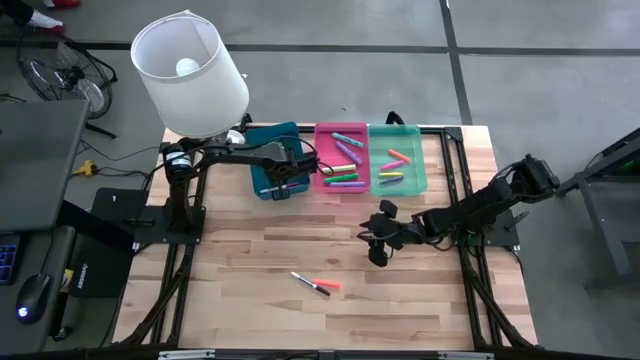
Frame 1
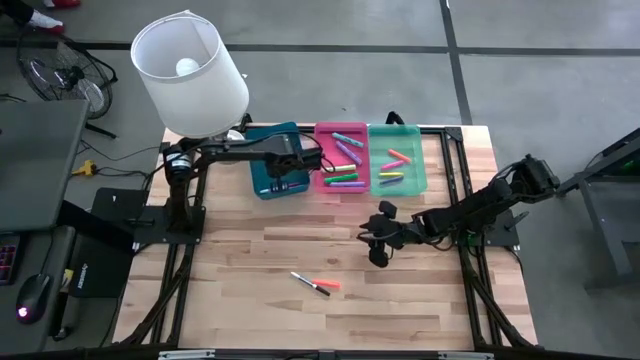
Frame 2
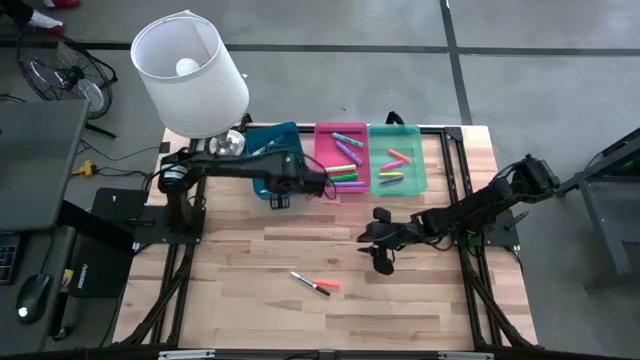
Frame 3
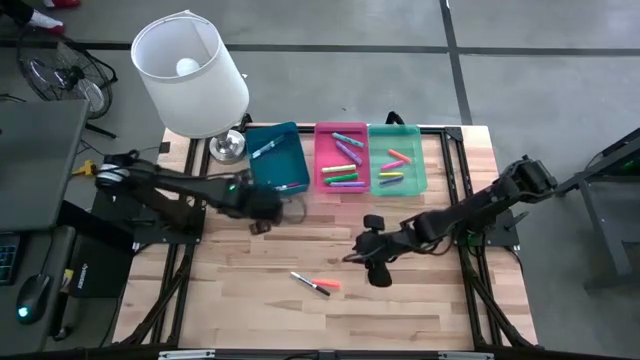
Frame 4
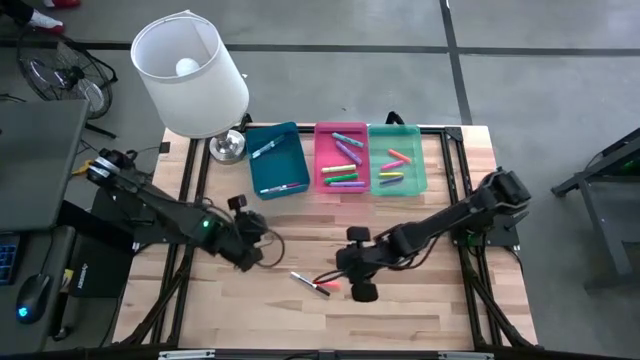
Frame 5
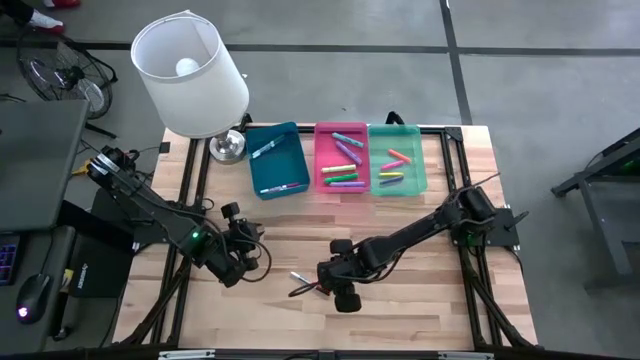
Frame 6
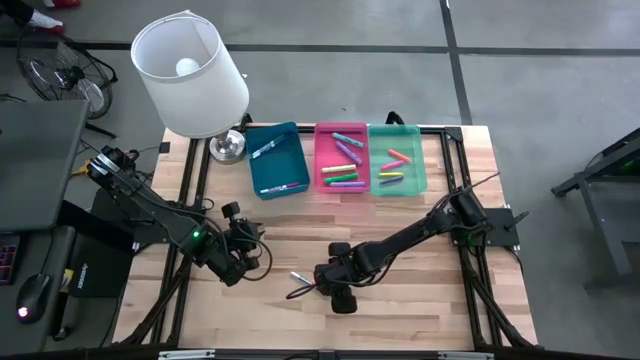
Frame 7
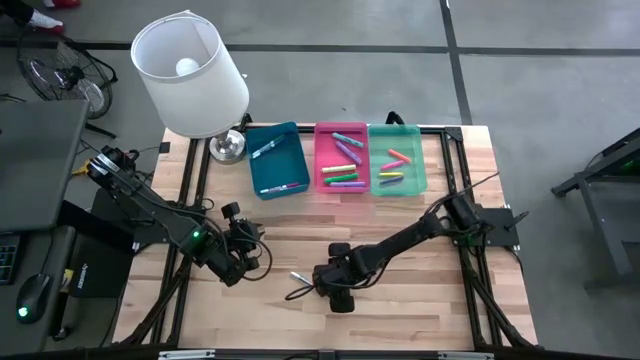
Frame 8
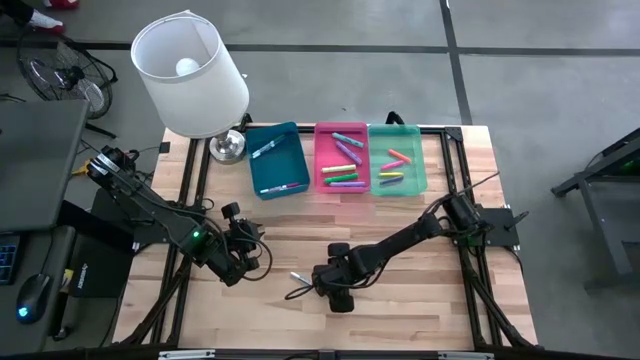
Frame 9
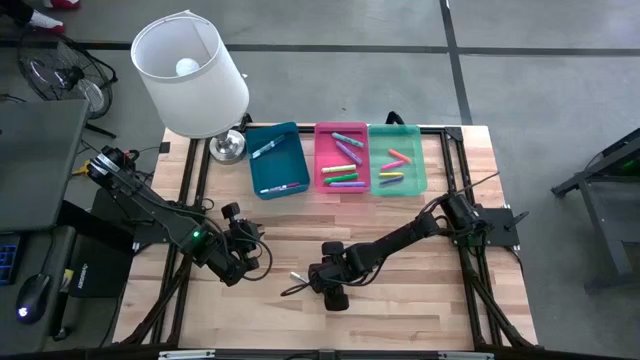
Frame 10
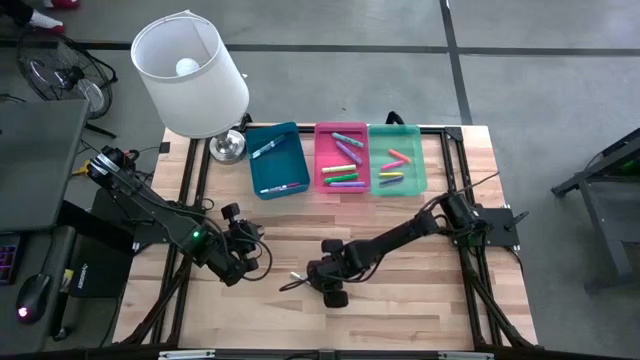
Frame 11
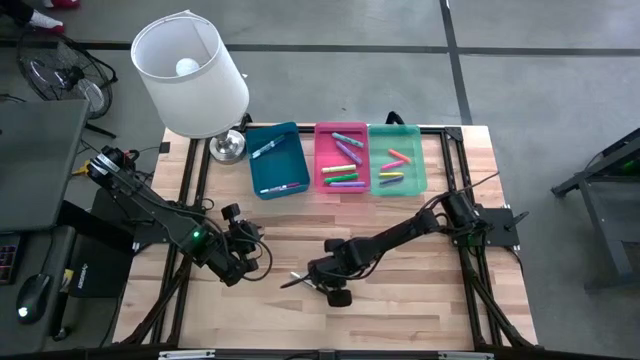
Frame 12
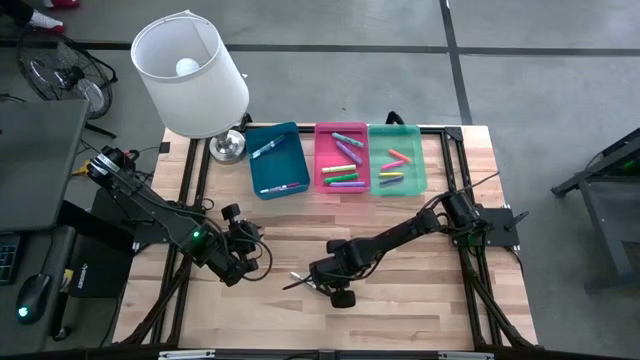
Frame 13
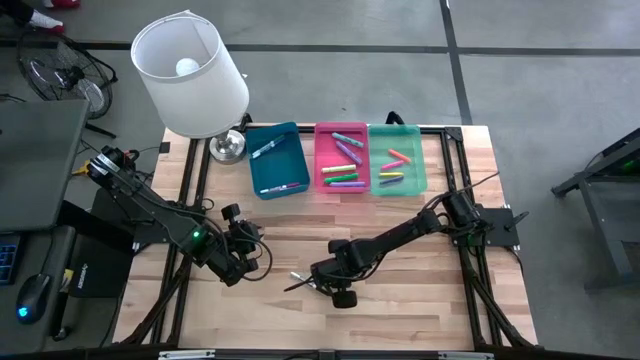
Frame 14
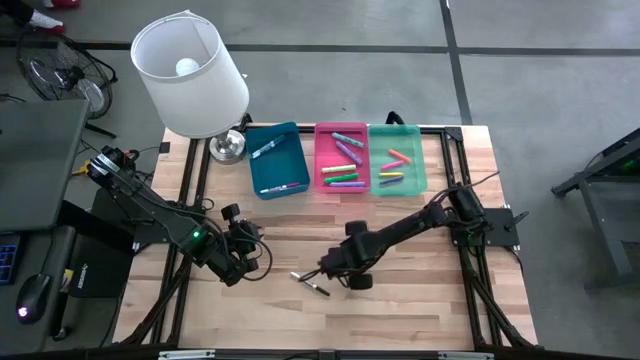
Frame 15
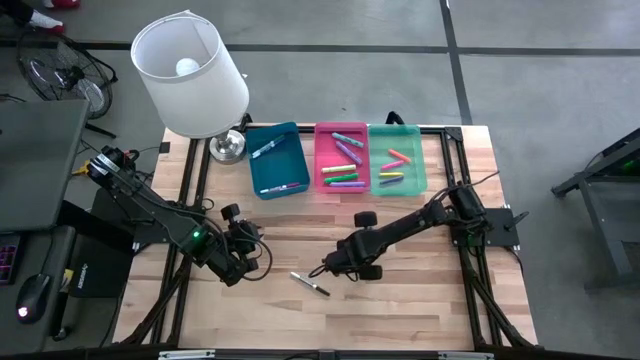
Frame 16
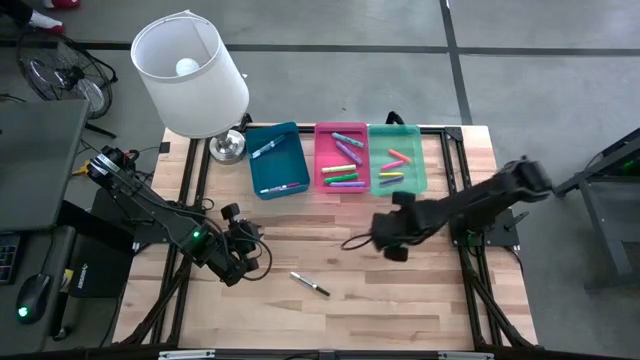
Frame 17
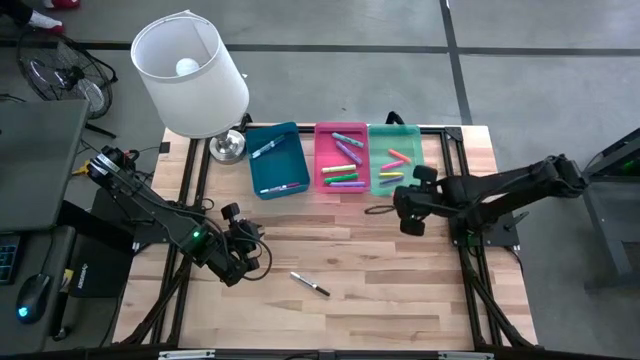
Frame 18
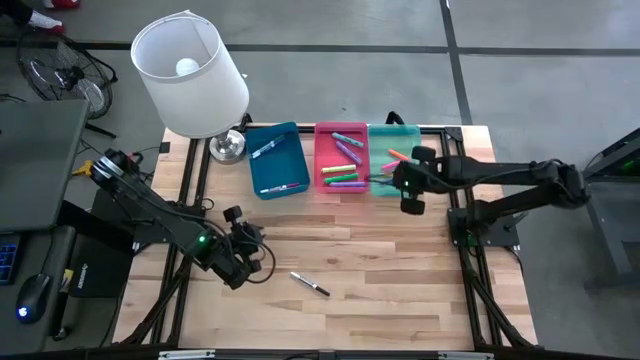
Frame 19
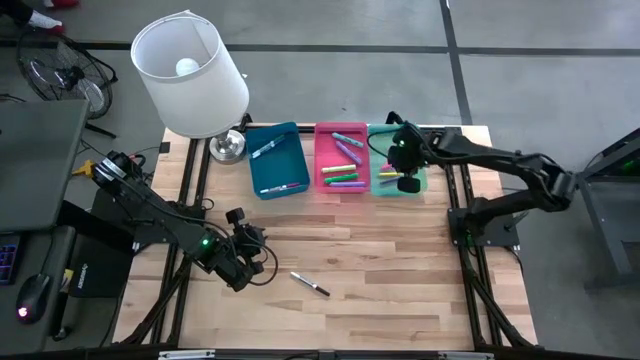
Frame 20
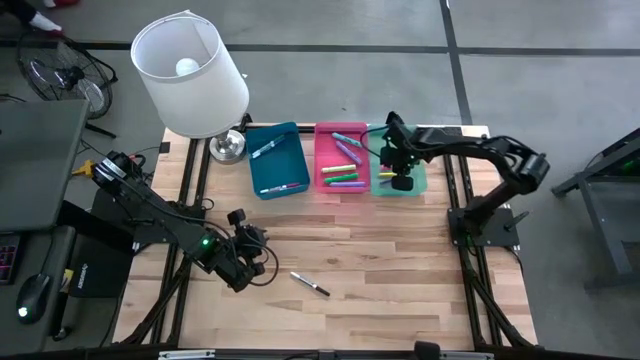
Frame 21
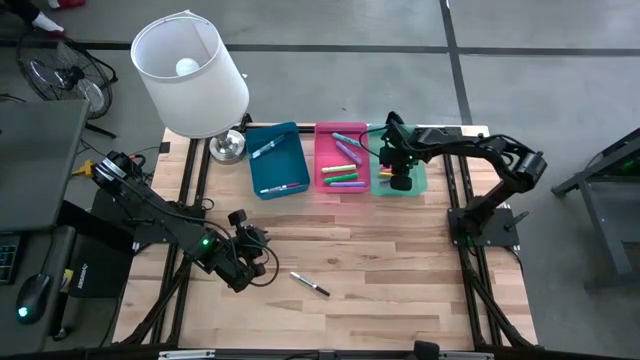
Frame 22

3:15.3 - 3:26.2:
Task: Pick & Place Markers
Put the orange pen into the green bin

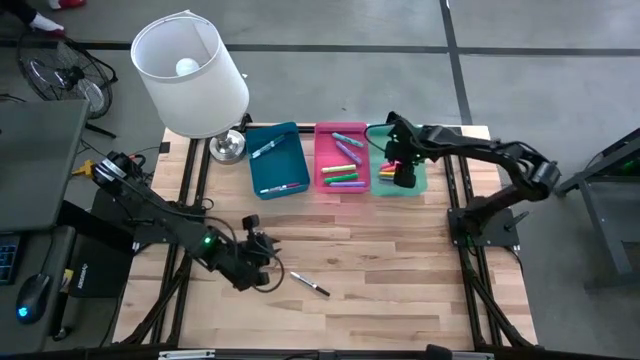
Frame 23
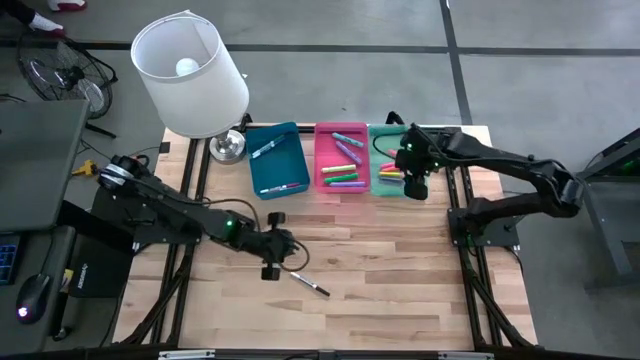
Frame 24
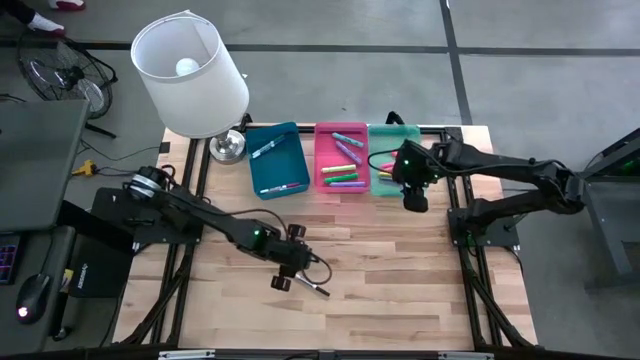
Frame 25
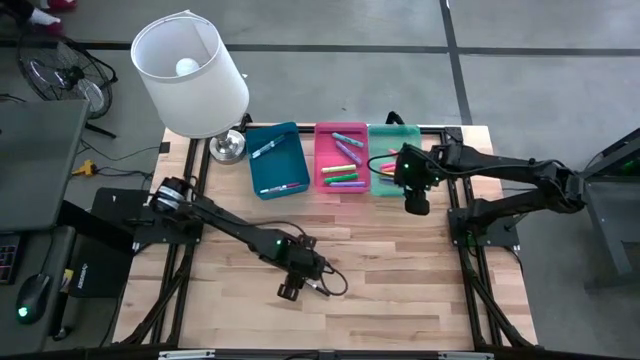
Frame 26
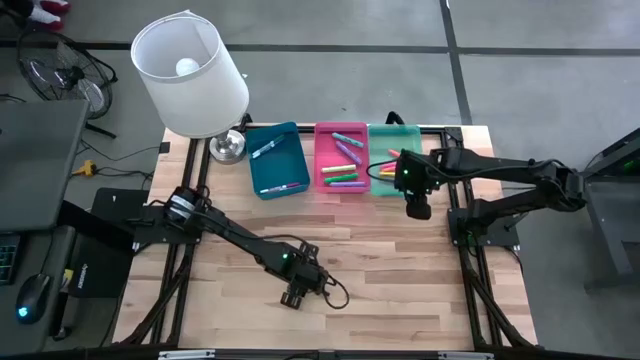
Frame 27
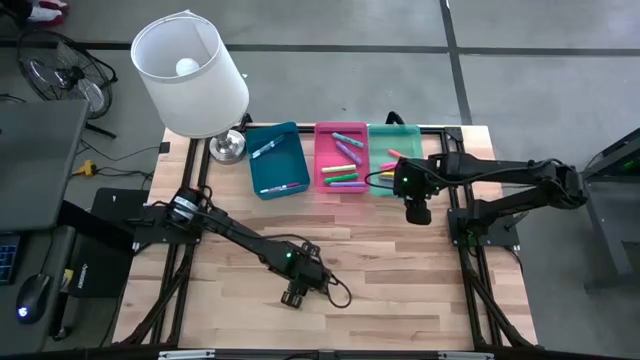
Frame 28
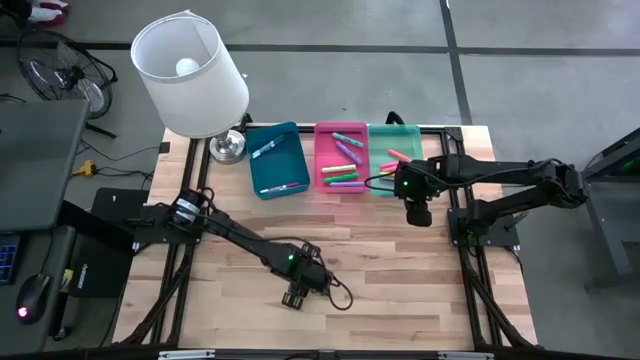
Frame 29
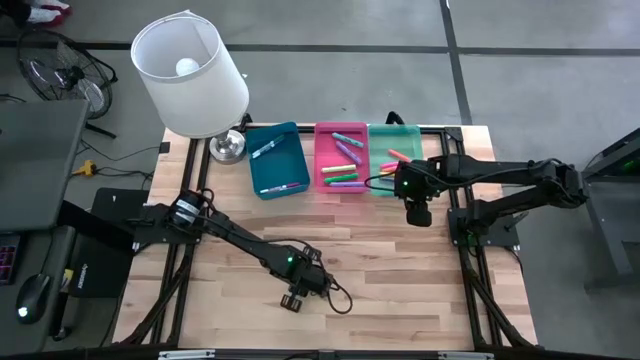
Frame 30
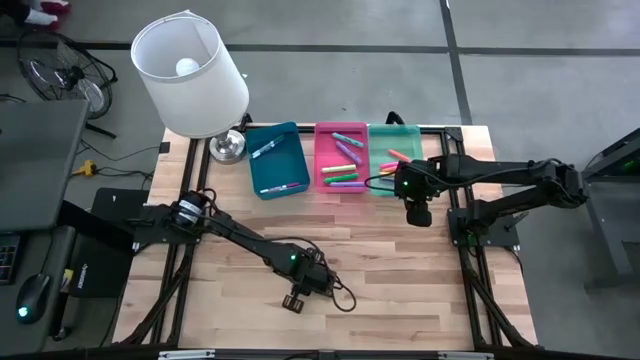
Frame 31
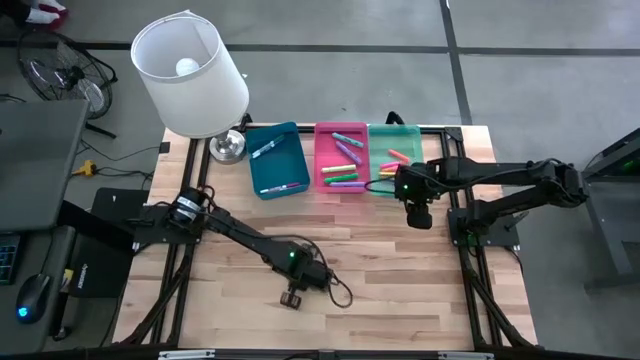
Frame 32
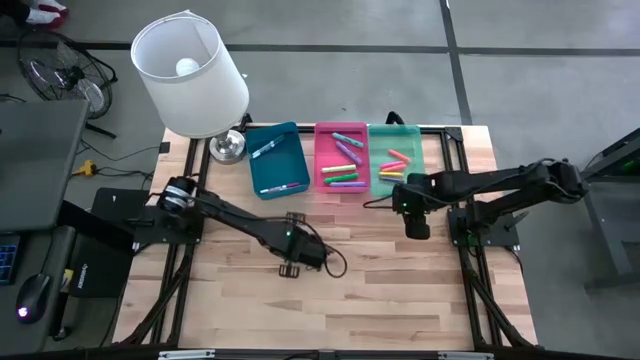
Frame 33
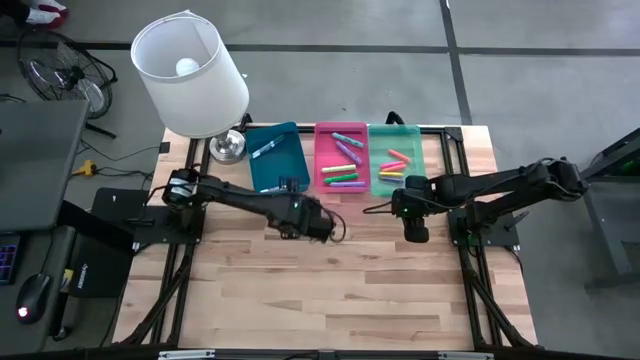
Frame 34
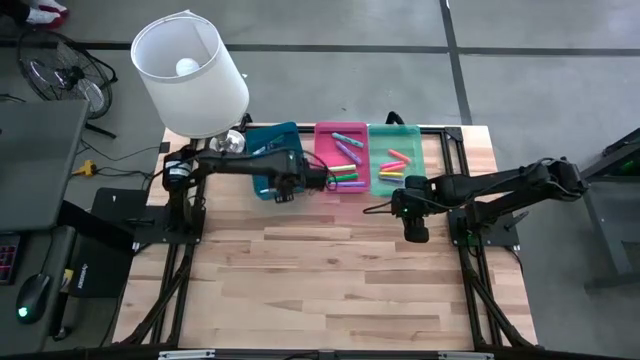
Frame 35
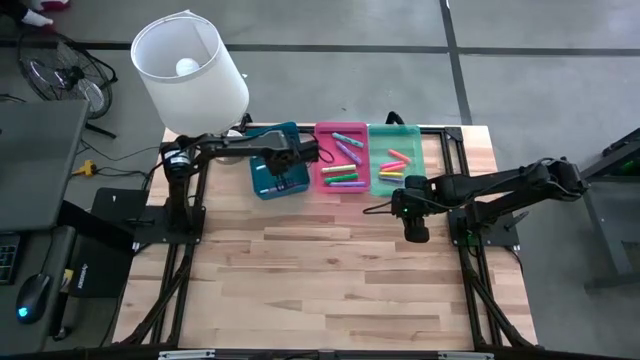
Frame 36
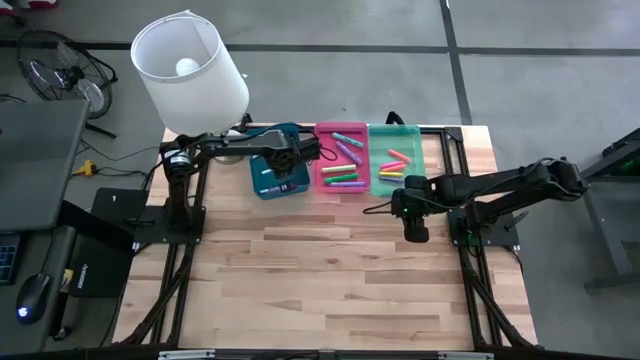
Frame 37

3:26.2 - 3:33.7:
Put the black dry erase marker into the dark blue bin

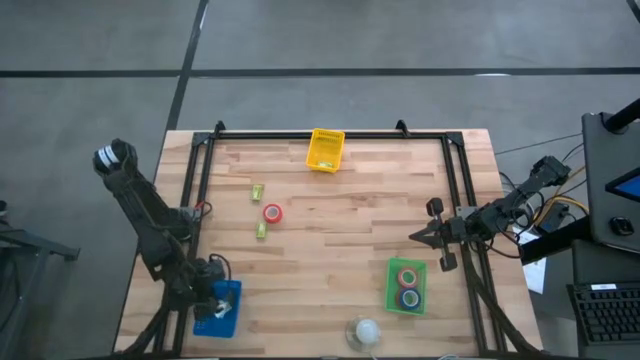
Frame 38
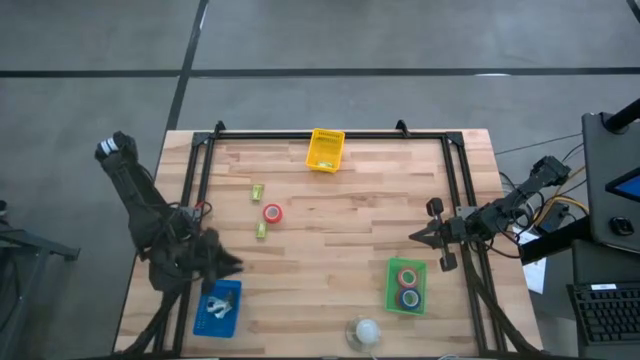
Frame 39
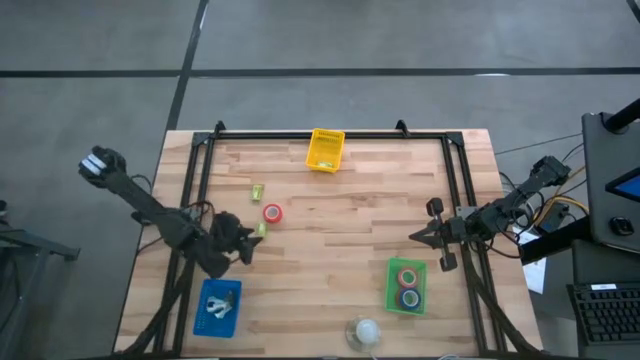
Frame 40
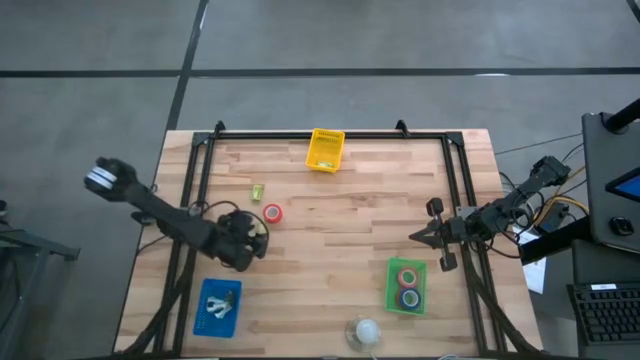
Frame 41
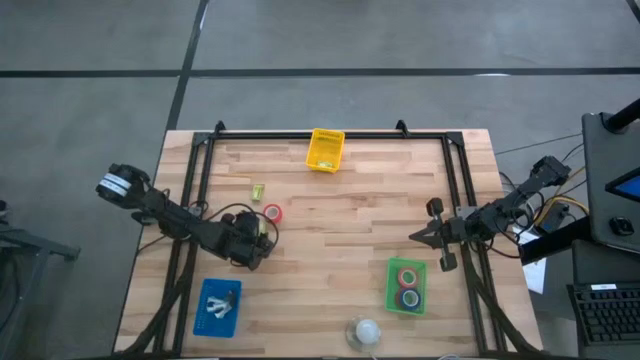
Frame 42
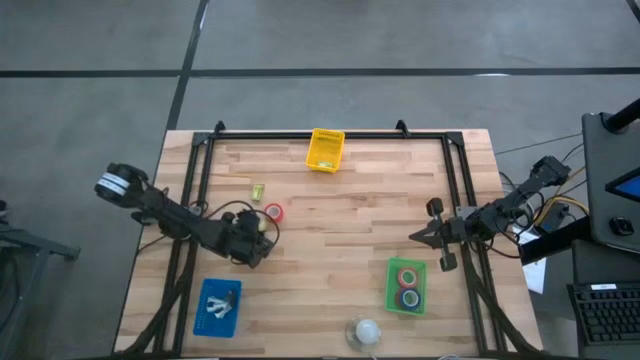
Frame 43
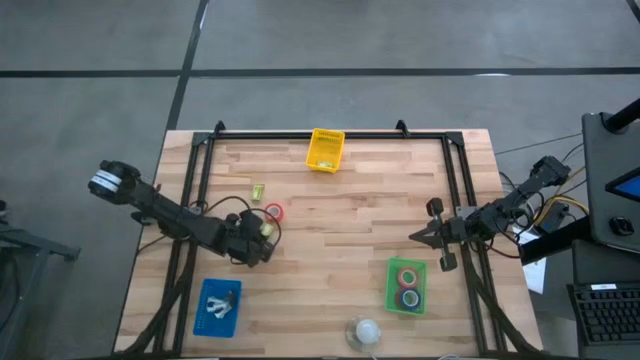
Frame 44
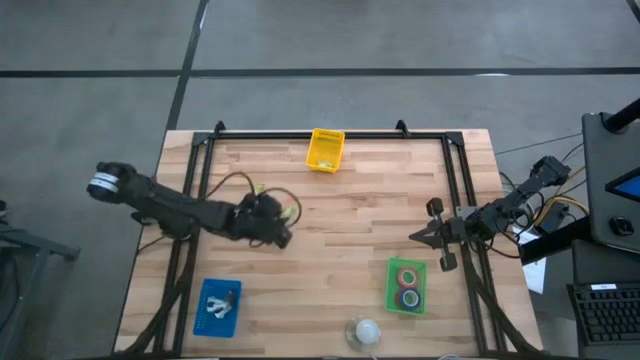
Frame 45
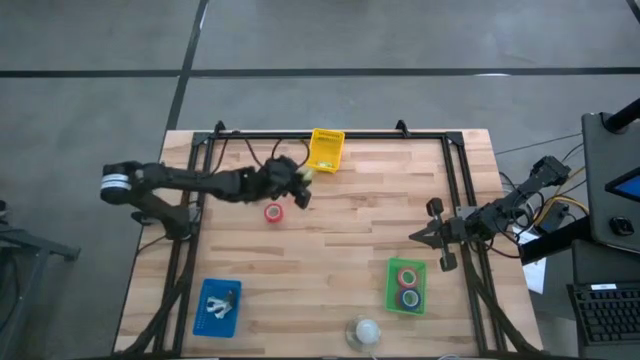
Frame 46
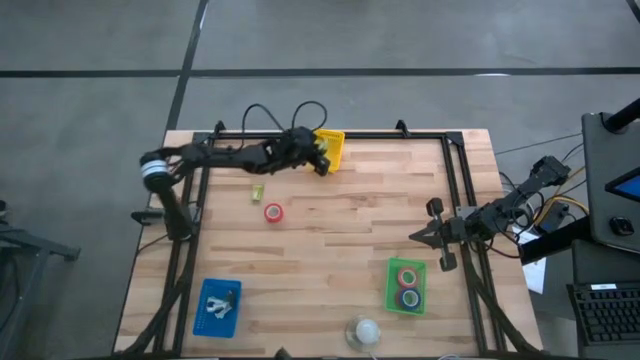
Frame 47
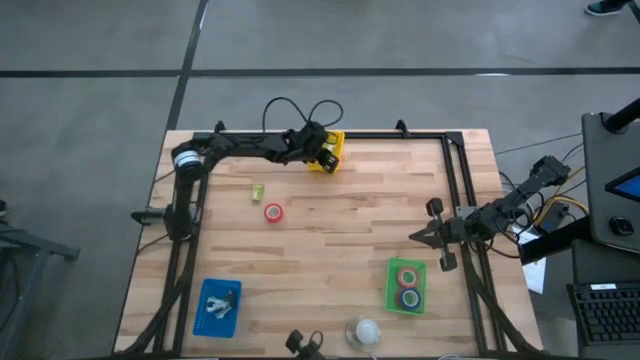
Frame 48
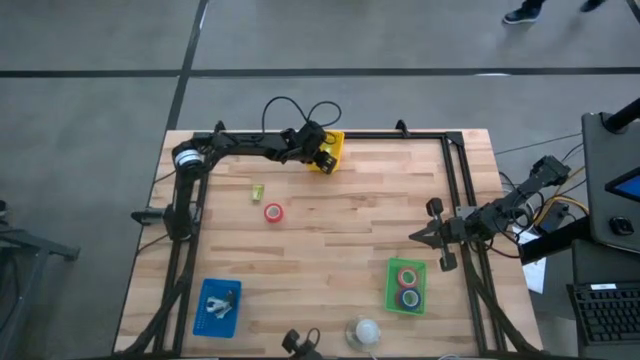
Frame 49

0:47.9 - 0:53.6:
Task: Pick and place Stapler, Stapler remover, tape
Put the bottom staple box into the yellow bin
